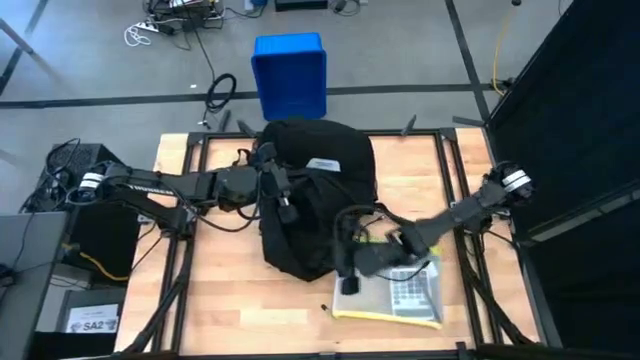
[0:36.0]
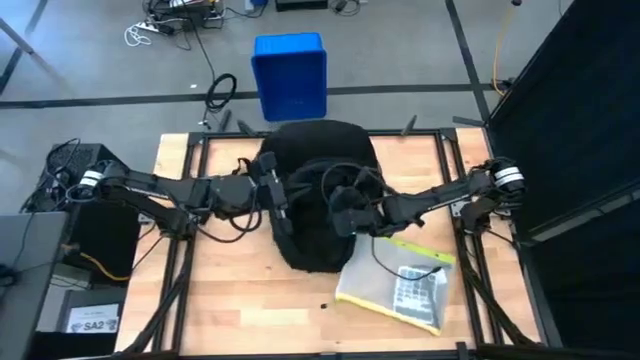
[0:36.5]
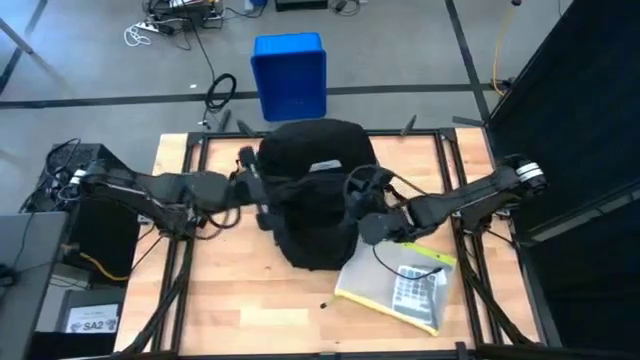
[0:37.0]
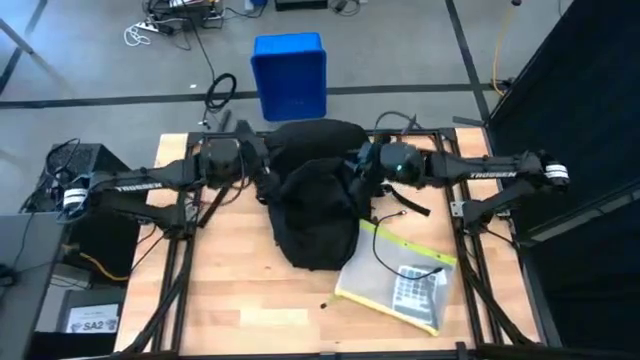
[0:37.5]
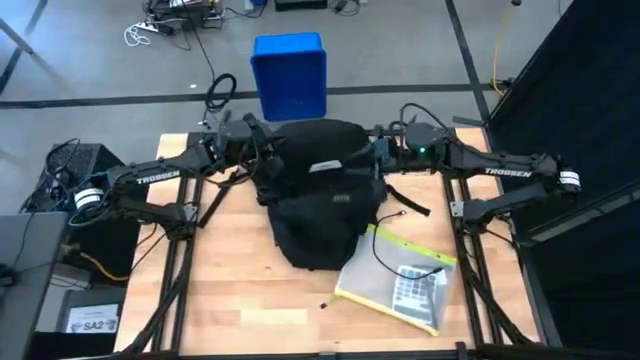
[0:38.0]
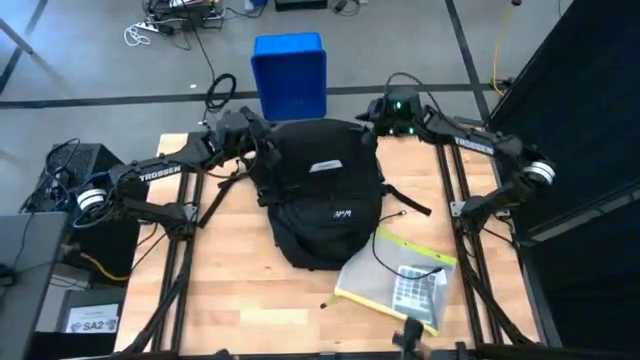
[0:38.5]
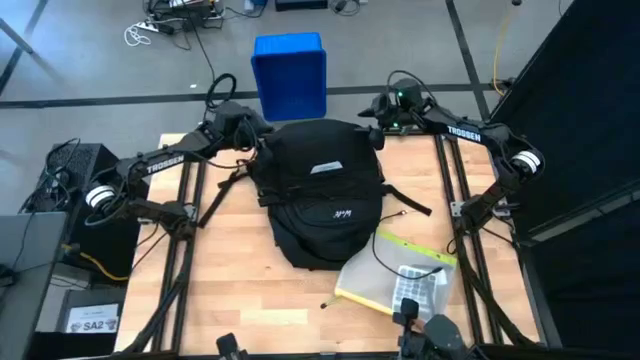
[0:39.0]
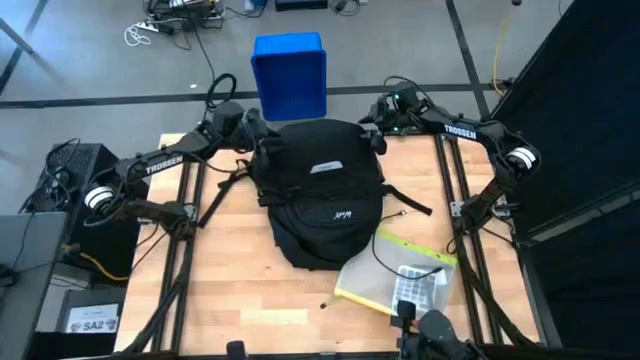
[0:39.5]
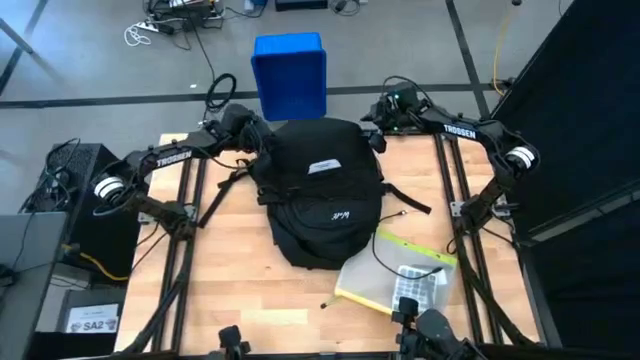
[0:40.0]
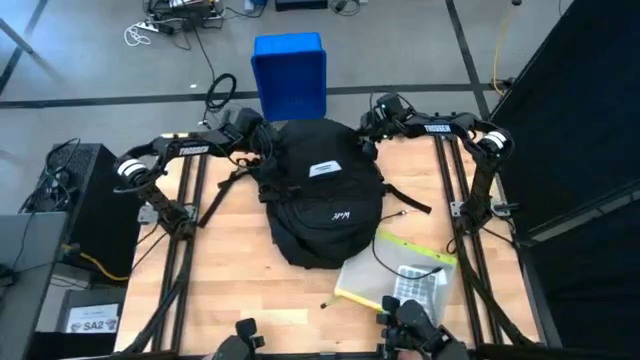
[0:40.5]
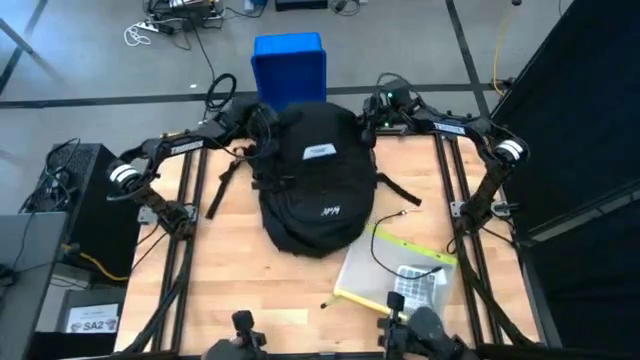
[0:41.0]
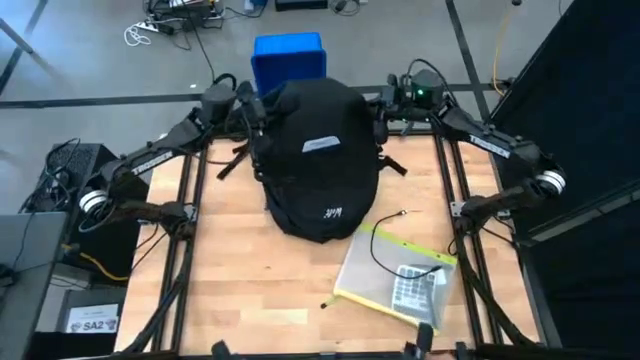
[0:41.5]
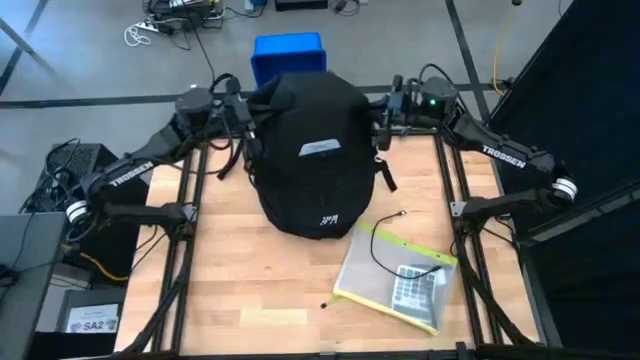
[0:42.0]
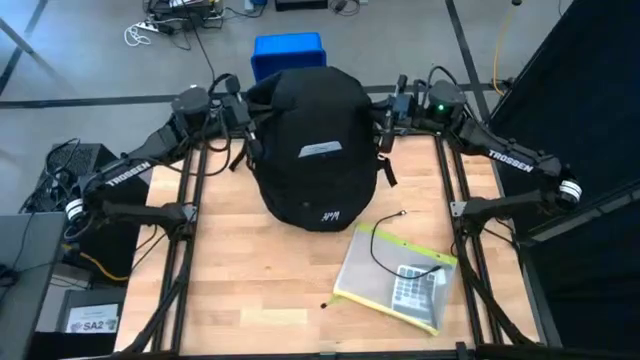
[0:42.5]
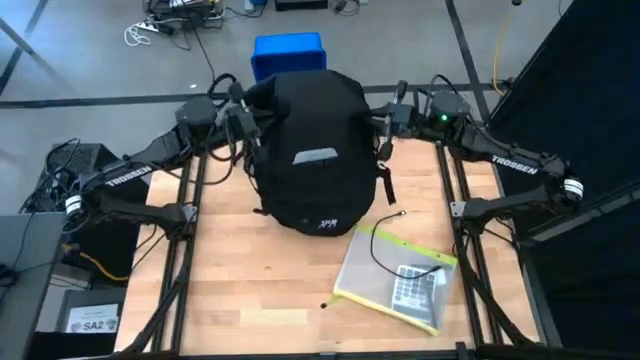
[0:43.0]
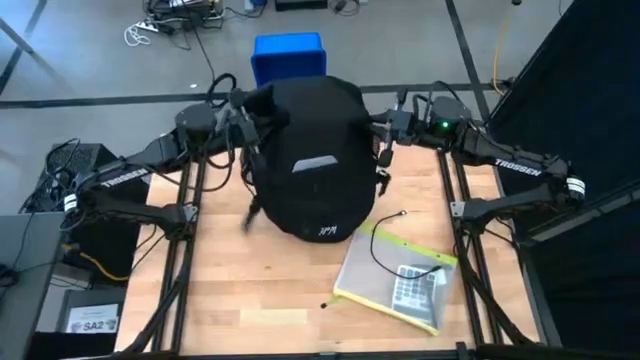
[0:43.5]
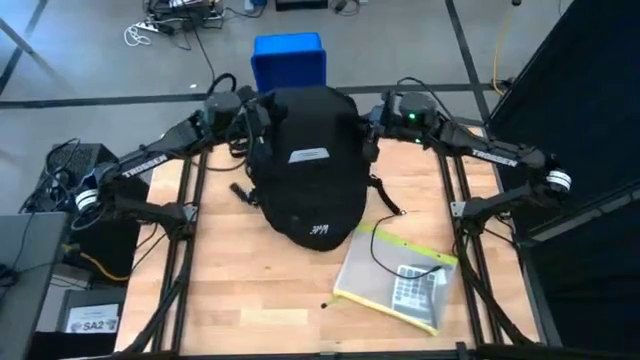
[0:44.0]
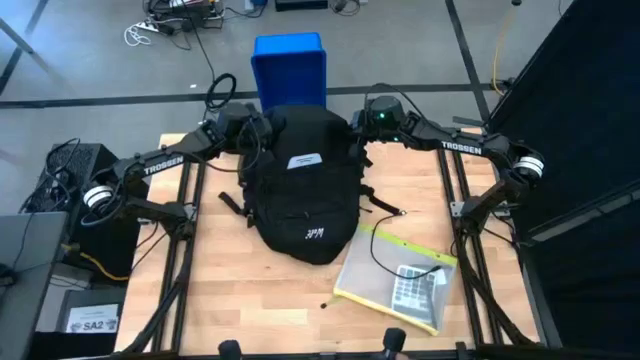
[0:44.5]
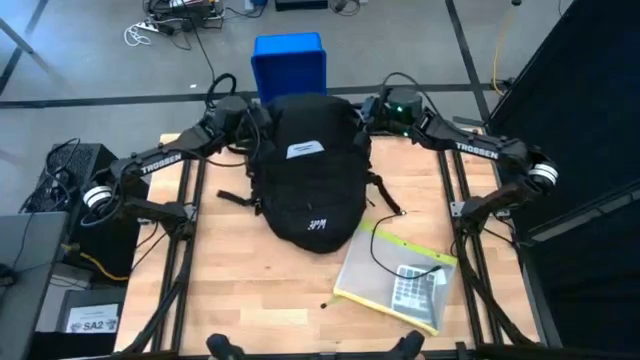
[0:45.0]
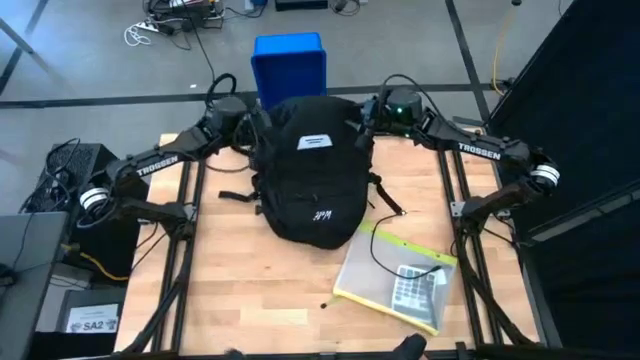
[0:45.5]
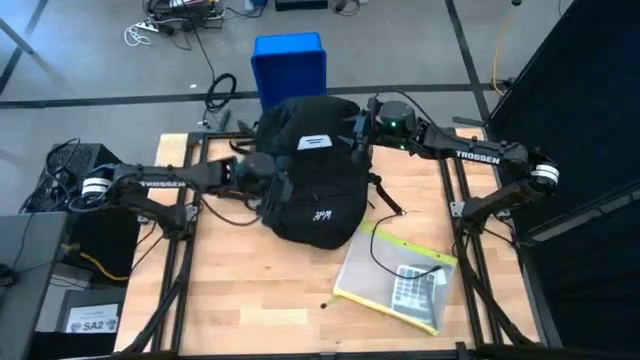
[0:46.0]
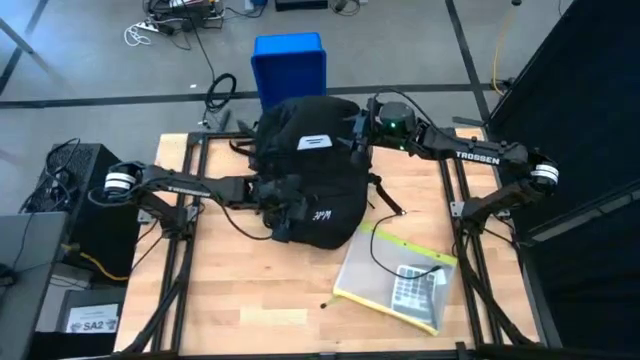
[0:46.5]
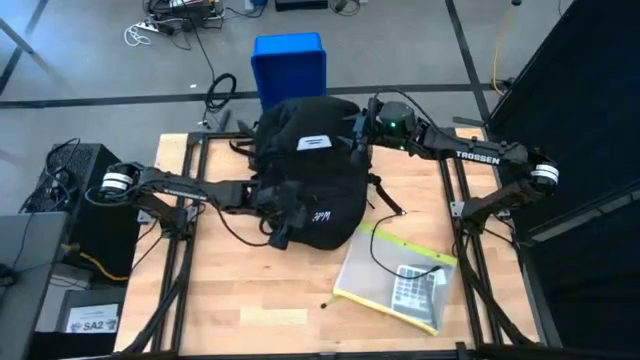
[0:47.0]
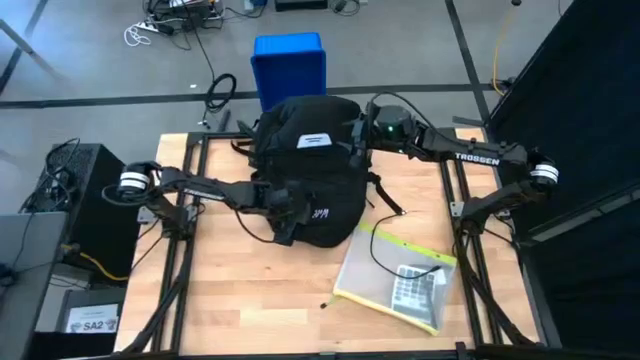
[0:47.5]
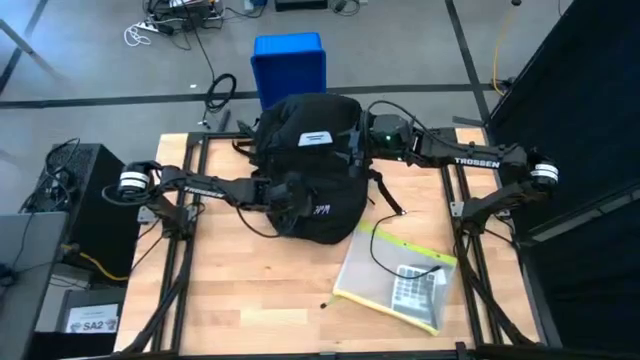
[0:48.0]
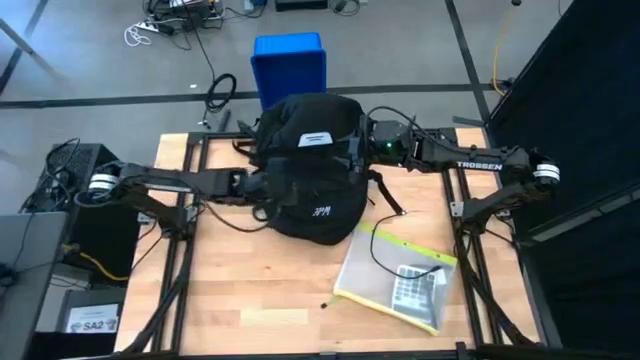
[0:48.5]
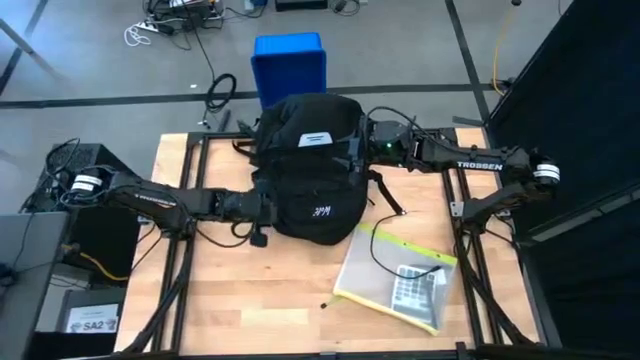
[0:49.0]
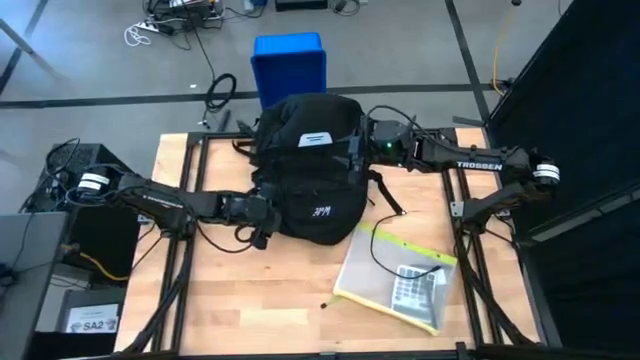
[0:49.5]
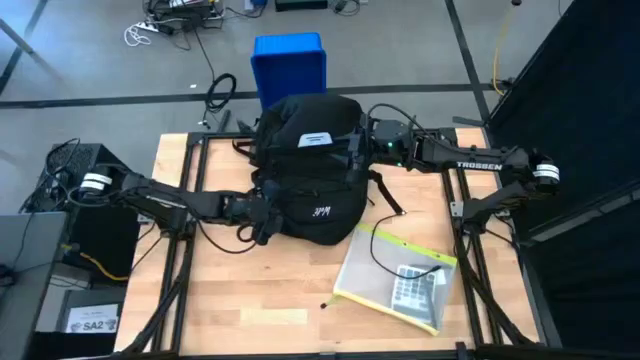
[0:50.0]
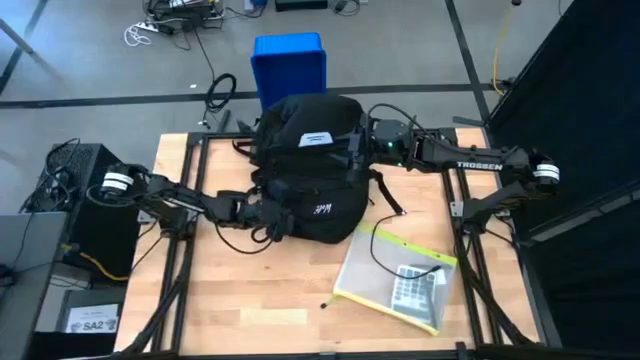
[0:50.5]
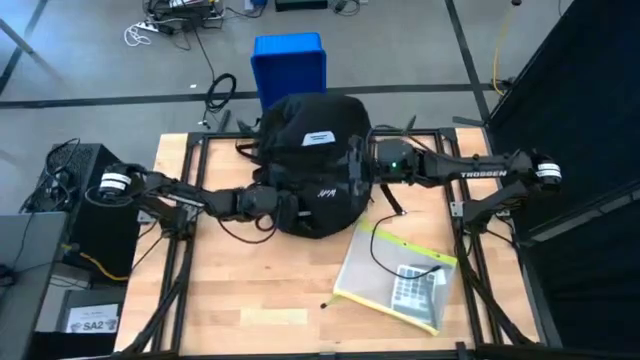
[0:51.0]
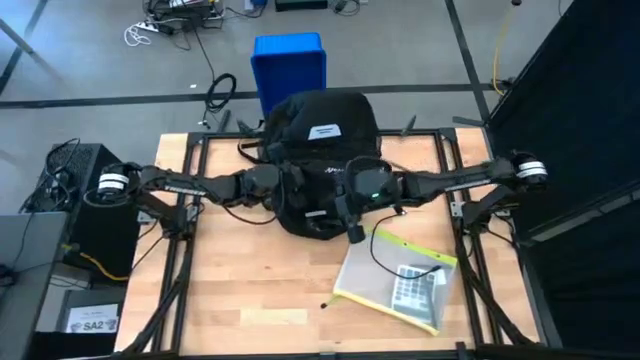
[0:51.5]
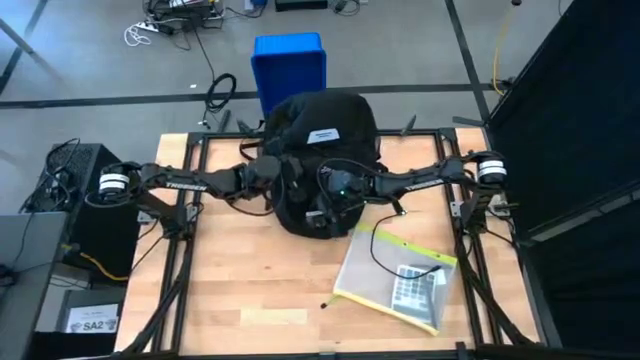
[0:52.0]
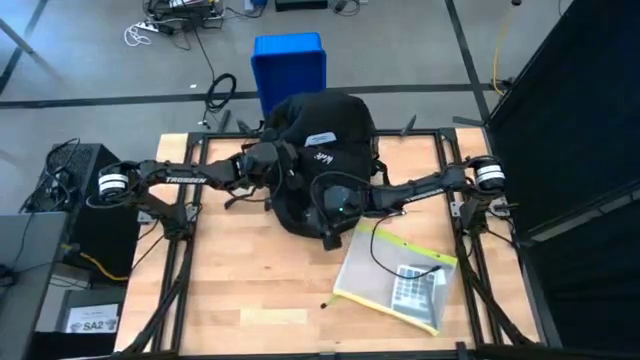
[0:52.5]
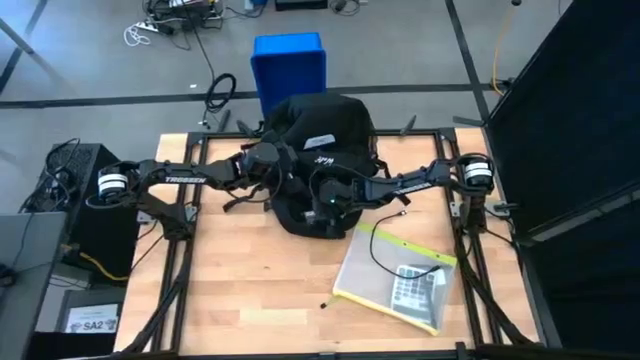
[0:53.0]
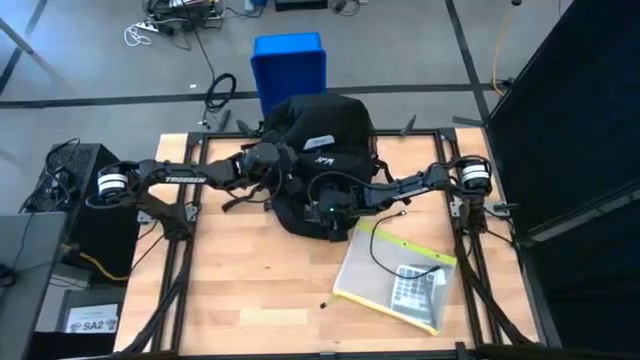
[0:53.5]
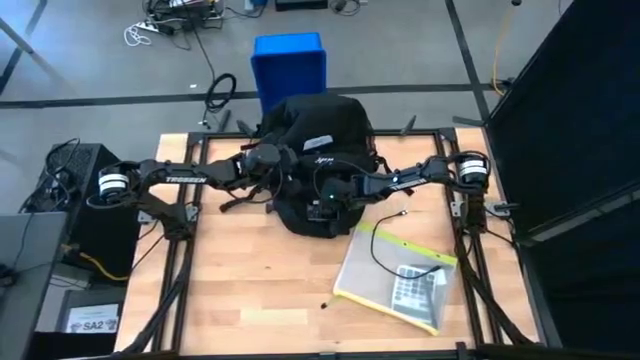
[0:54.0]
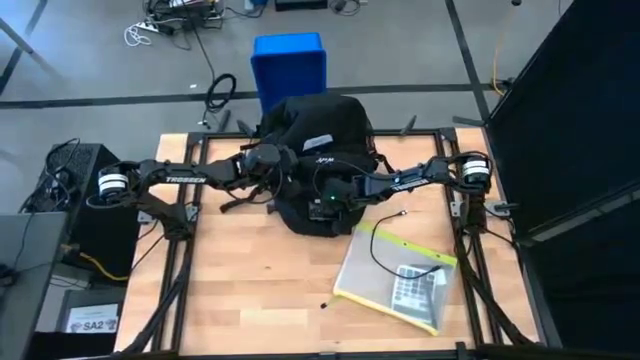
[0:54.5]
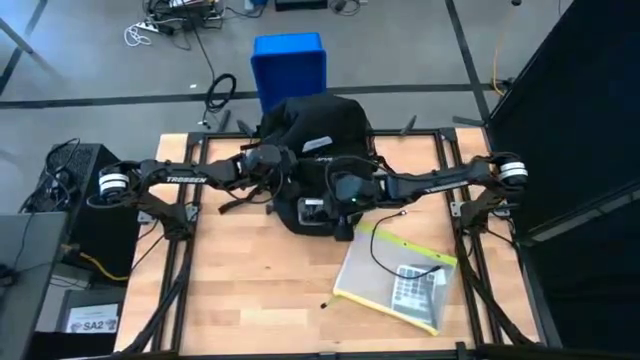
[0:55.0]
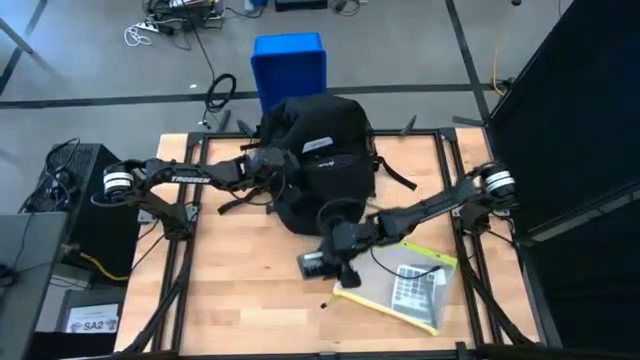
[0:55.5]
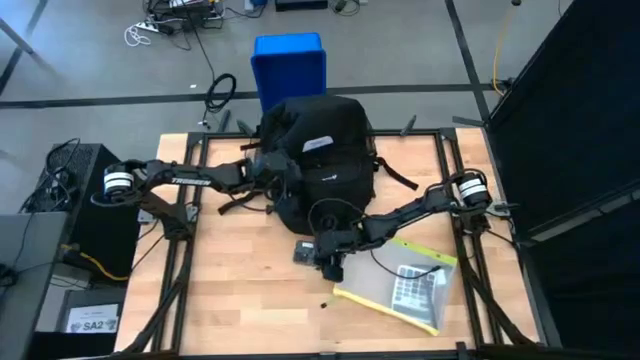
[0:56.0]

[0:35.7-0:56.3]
Task: Unpack backpack
Remove the cellphone from the backpack

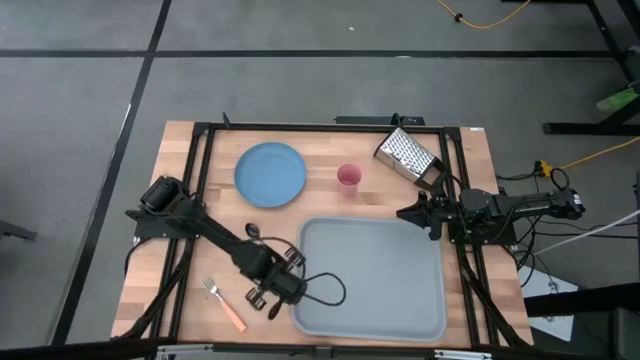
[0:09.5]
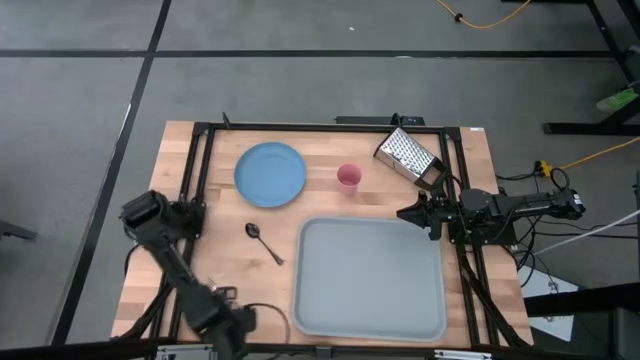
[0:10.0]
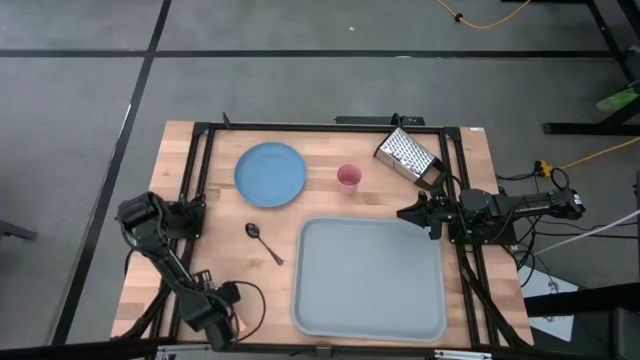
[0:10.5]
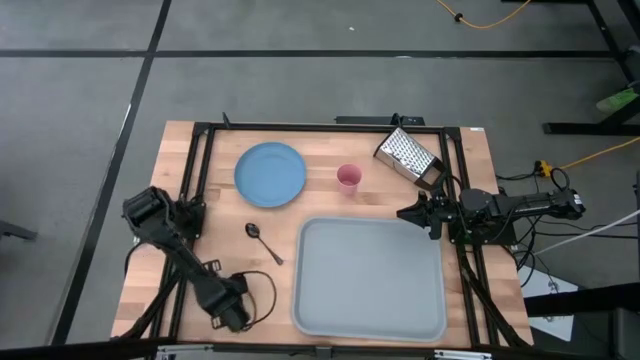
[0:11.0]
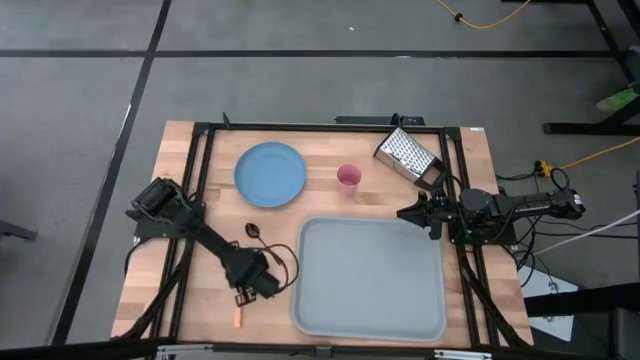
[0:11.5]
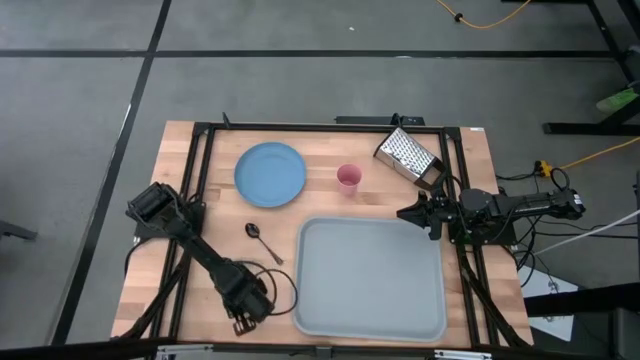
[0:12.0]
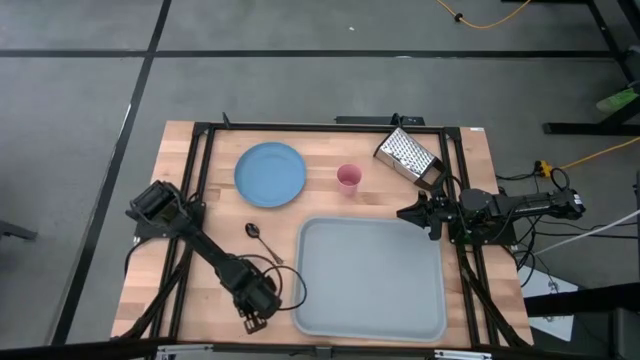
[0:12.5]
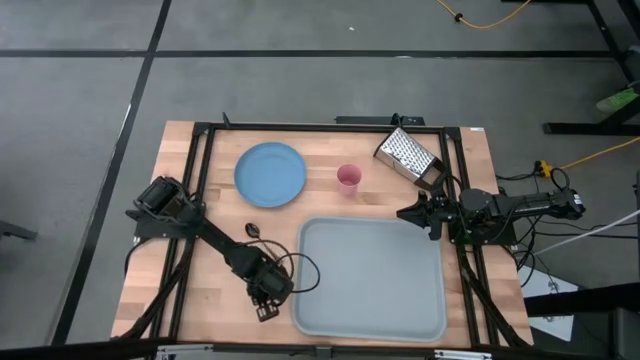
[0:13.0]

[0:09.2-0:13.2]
Task: Pick and place plate/cup/fork/spoon on tray
Adjust the orange fork
